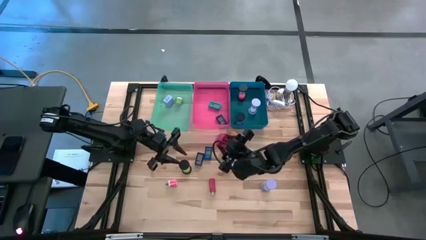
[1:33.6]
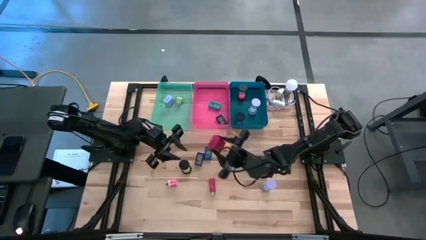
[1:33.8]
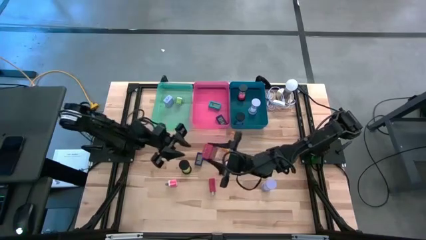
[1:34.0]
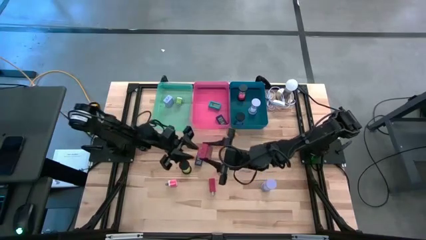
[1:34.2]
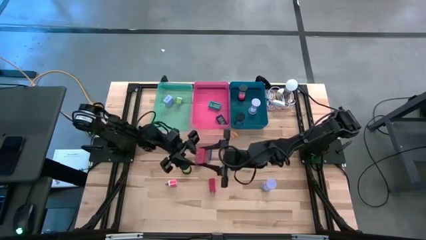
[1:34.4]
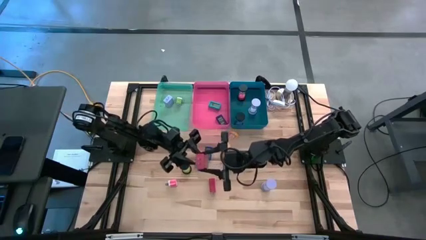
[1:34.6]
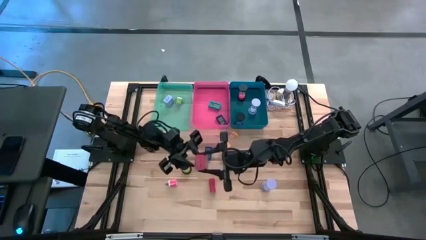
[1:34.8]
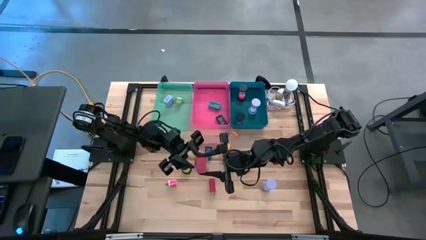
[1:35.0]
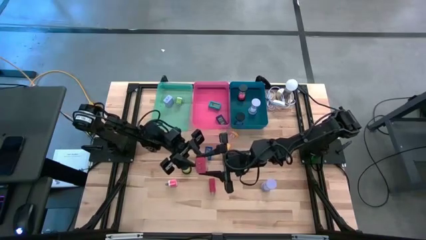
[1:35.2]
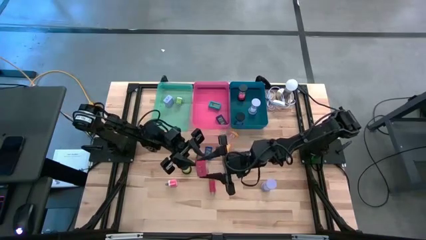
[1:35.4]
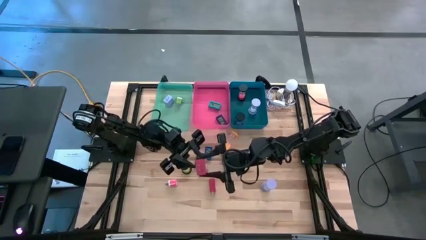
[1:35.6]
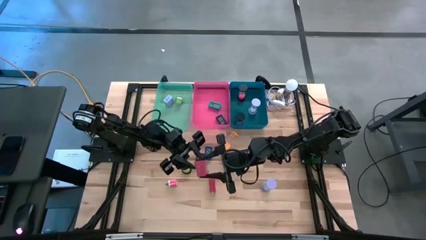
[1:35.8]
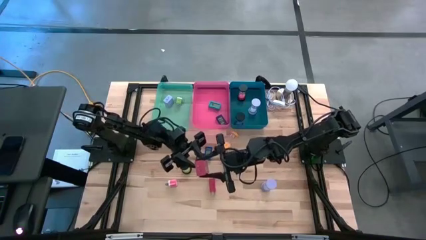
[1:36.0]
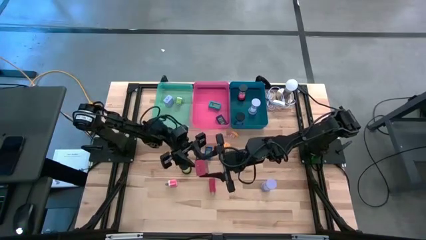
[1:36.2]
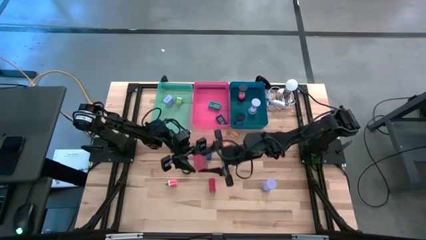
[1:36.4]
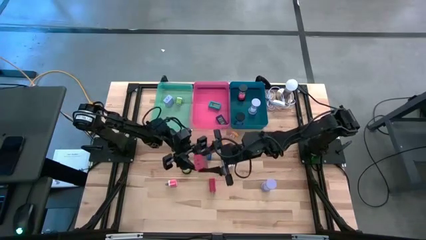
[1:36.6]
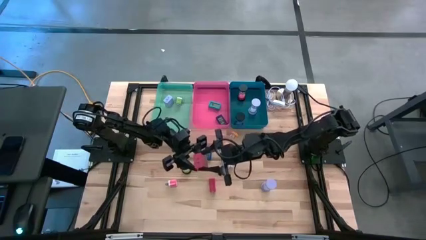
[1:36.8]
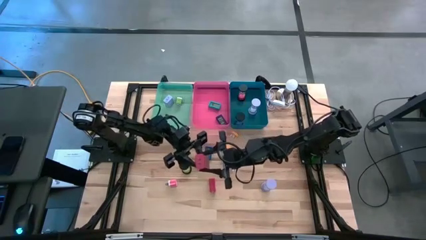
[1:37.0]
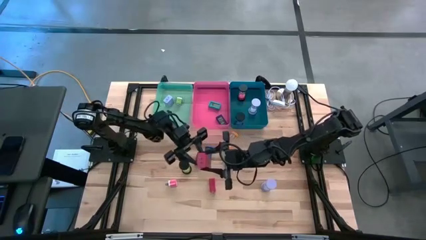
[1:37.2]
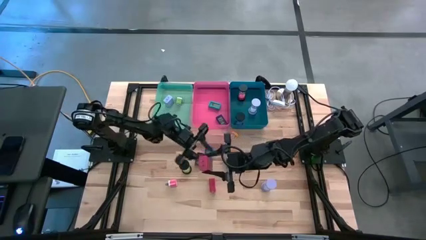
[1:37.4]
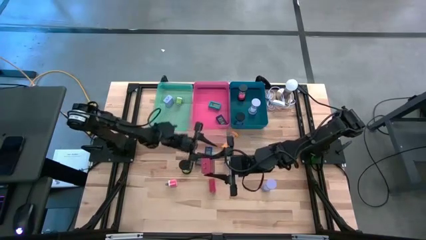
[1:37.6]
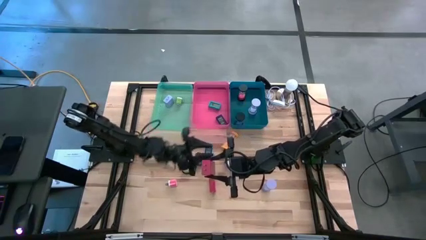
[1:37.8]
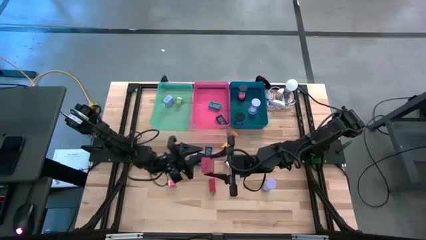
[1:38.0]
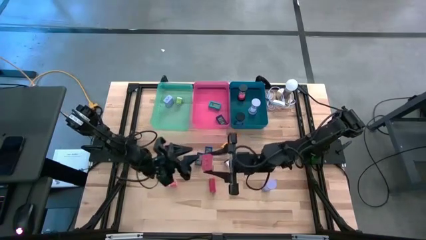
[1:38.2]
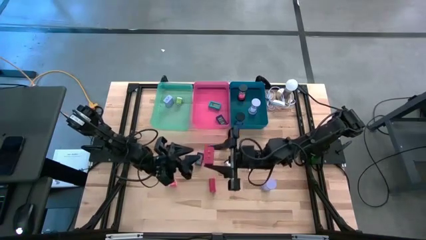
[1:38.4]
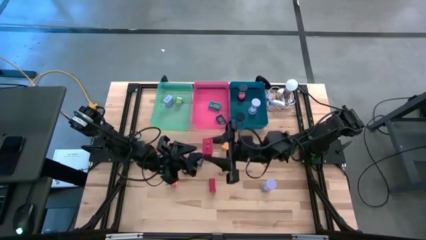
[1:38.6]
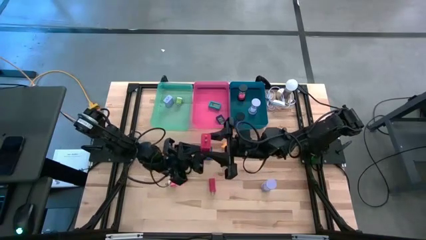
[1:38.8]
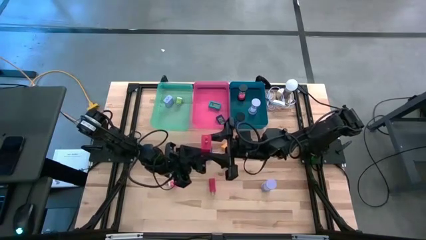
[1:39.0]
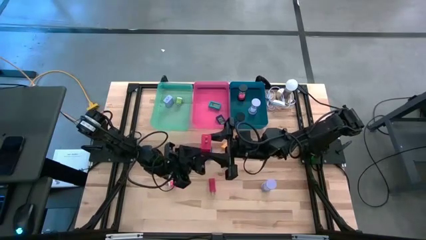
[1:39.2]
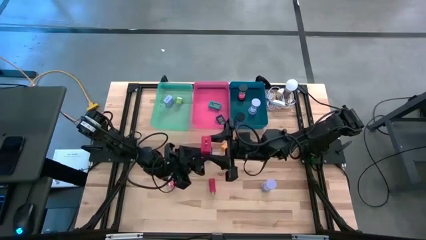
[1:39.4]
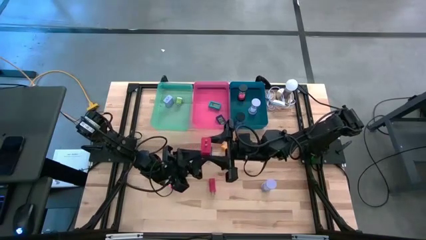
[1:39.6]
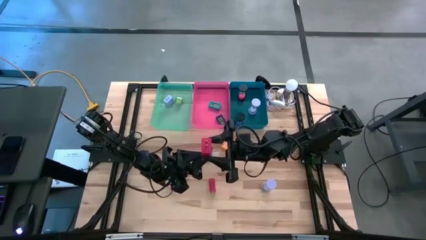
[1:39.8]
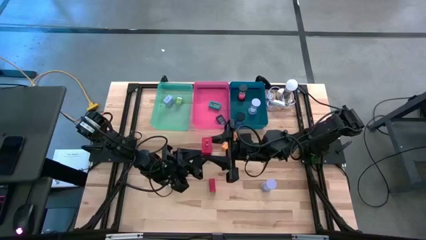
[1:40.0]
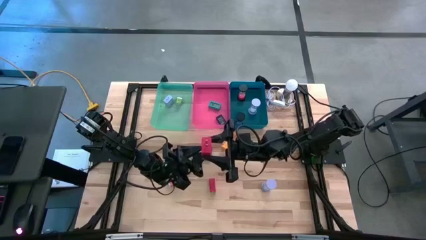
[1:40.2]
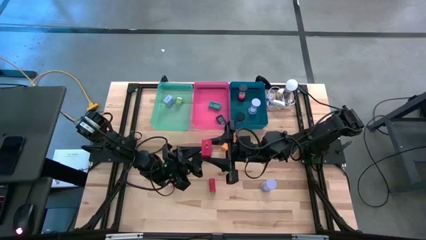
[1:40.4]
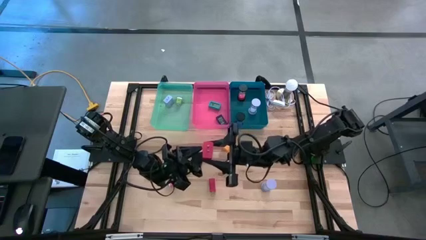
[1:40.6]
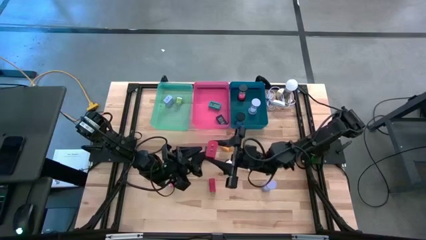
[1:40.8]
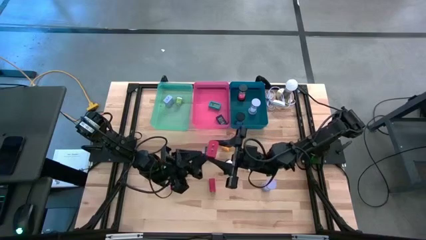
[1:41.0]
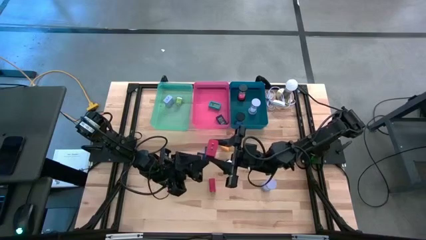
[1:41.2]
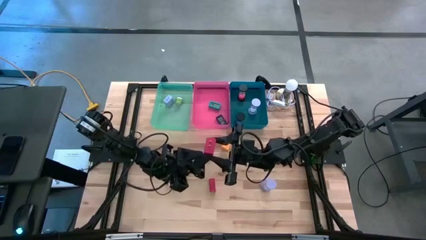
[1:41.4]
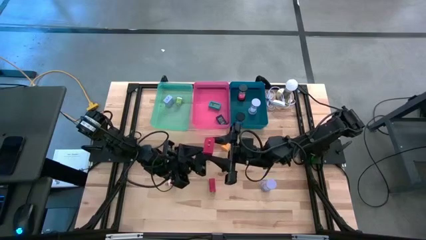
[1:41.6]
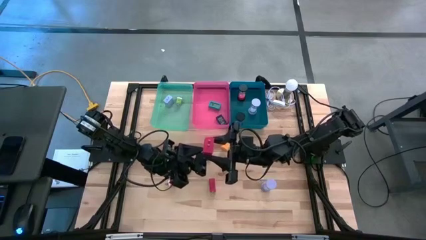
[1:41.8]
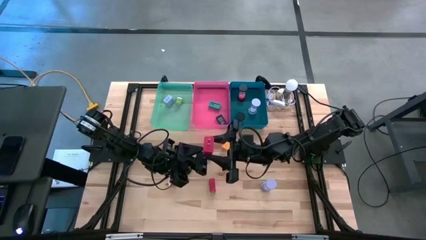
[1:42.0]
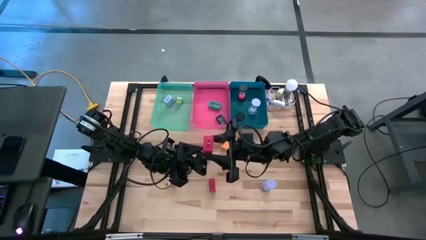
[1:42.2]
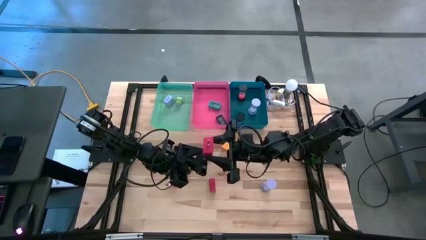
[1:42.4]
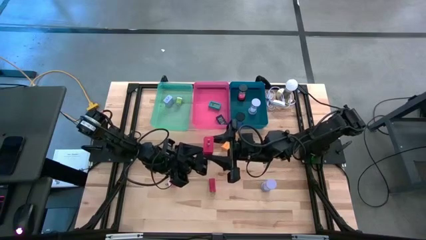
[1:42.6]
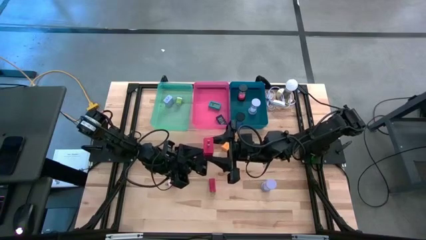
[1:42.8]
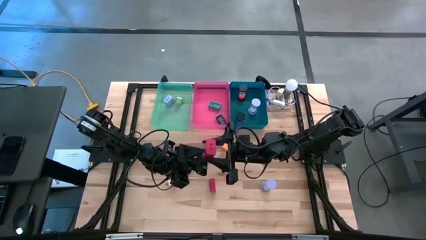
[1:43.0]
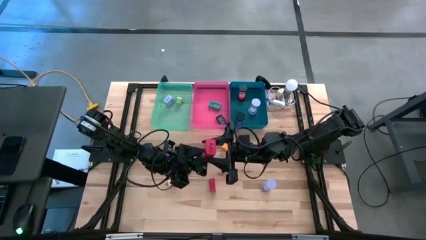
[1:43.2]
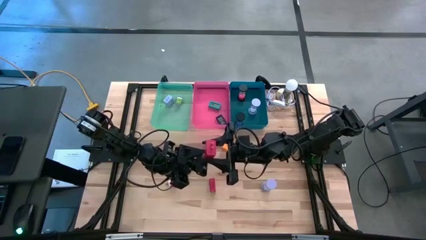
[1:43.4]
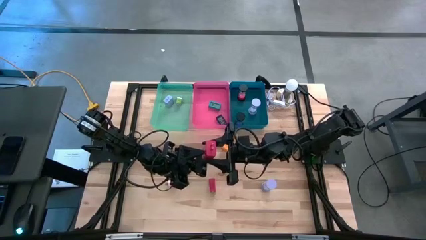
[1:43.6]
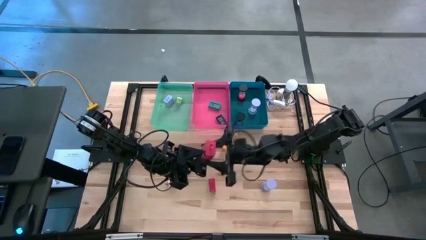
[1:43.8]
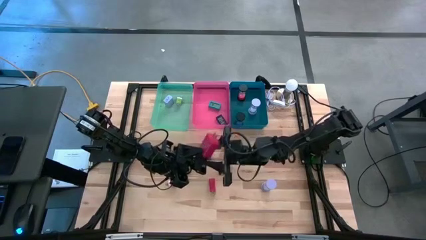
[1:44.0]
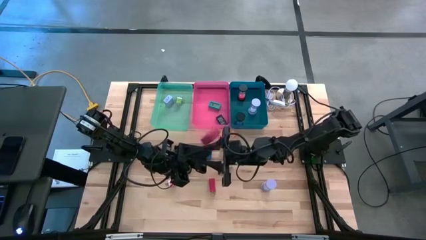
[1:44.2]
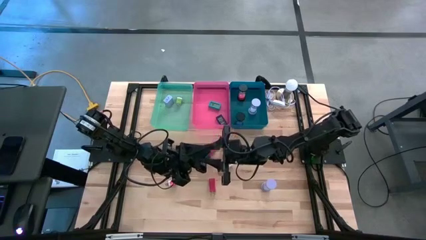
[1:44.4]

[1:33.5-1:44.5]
Task: Pick & Place Office items
Put the right red adapter into the green bin

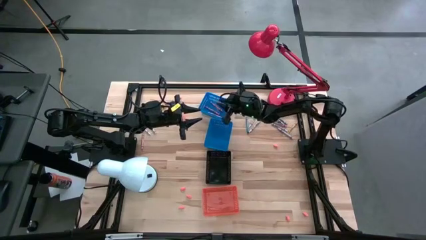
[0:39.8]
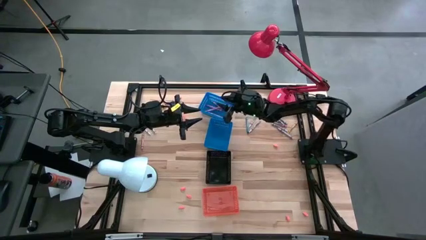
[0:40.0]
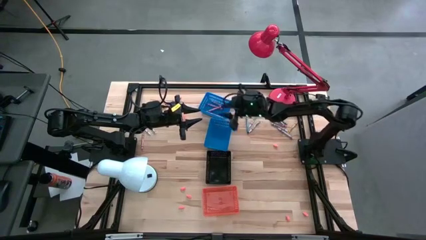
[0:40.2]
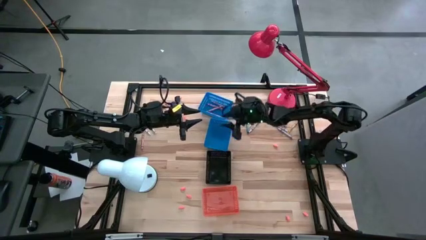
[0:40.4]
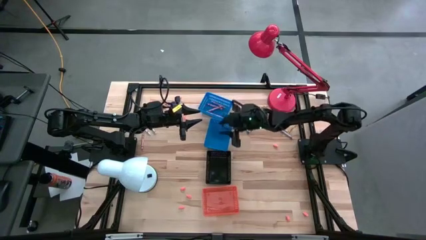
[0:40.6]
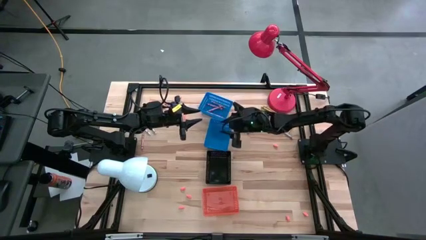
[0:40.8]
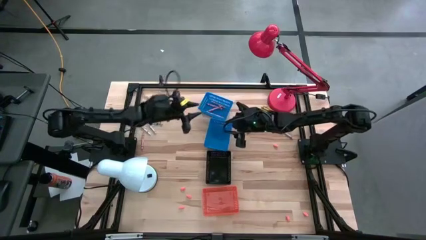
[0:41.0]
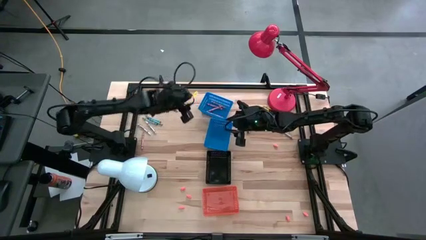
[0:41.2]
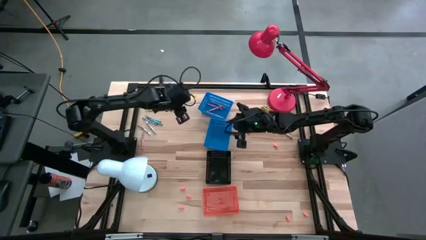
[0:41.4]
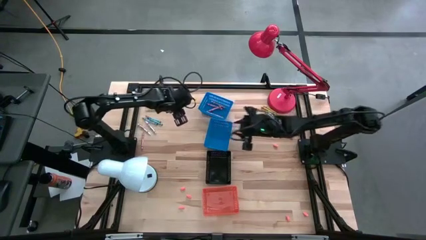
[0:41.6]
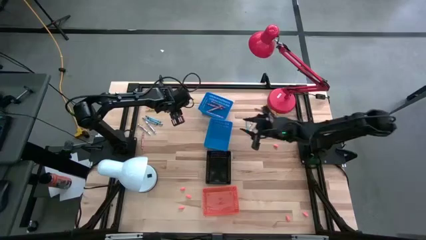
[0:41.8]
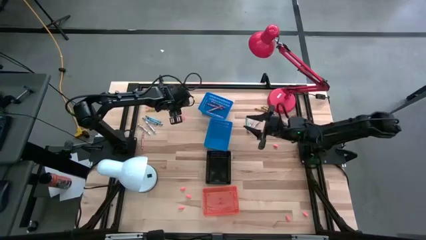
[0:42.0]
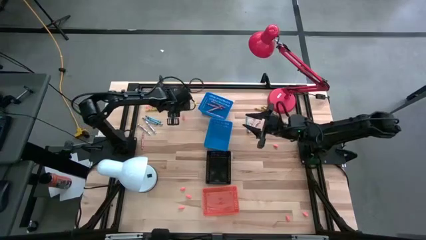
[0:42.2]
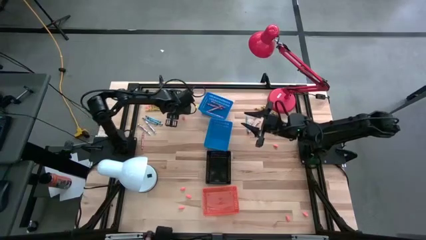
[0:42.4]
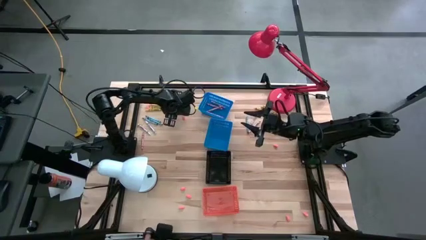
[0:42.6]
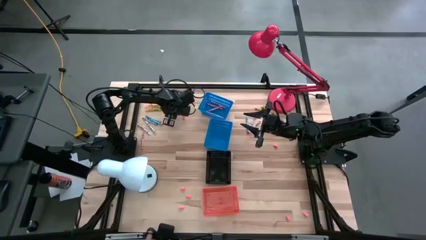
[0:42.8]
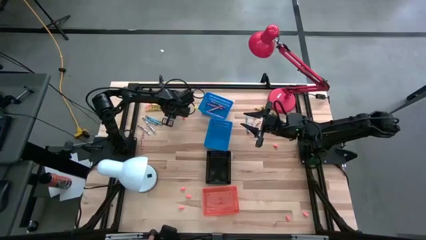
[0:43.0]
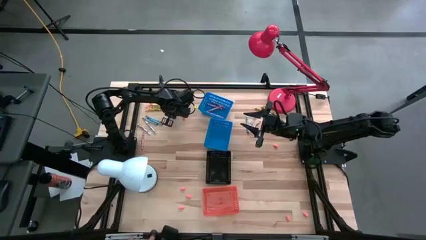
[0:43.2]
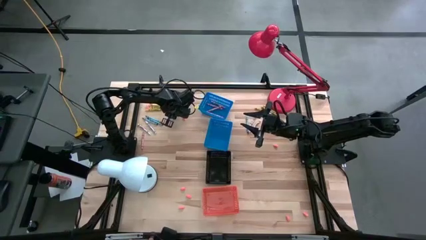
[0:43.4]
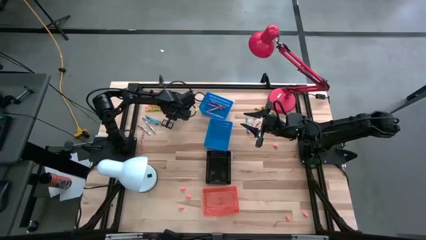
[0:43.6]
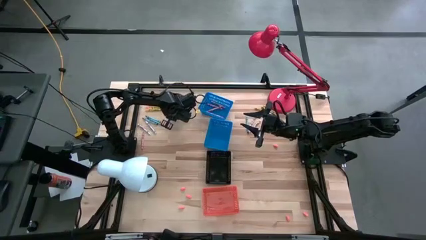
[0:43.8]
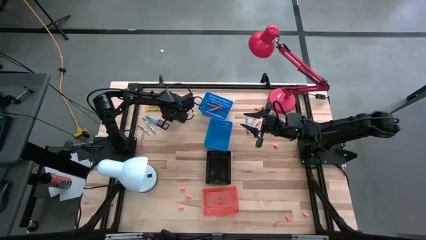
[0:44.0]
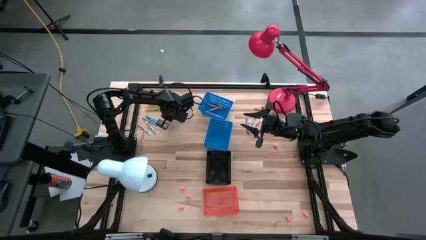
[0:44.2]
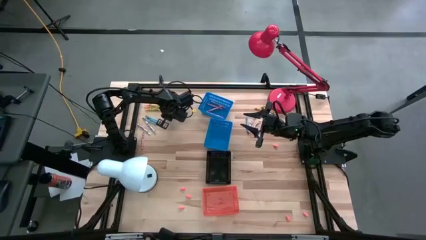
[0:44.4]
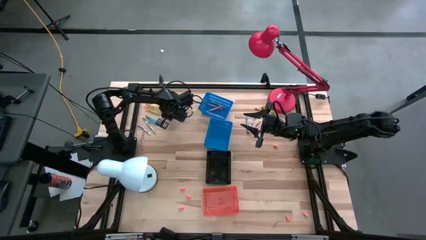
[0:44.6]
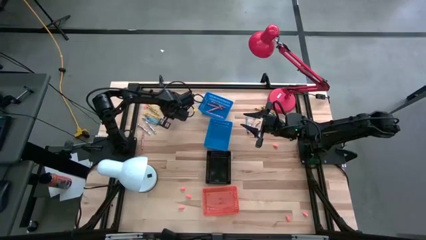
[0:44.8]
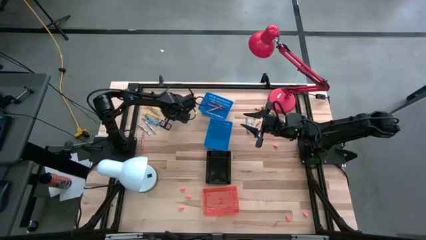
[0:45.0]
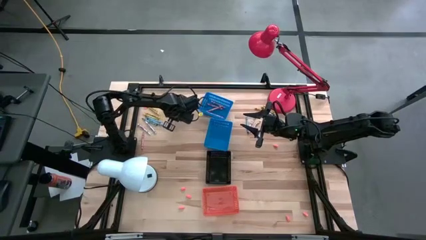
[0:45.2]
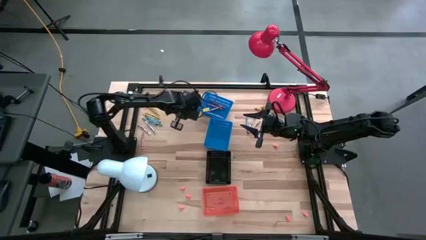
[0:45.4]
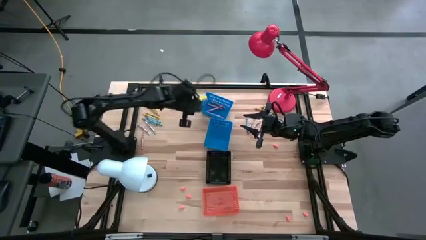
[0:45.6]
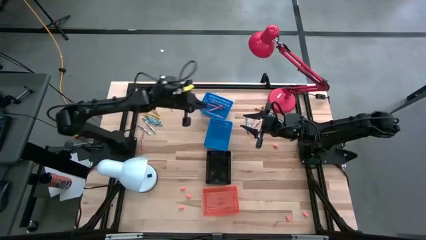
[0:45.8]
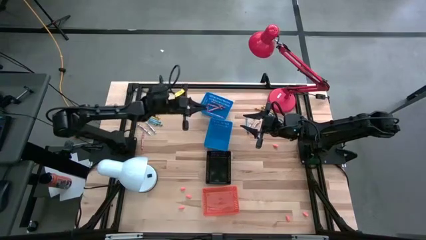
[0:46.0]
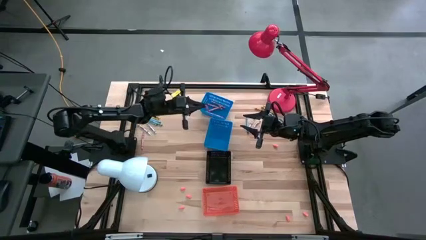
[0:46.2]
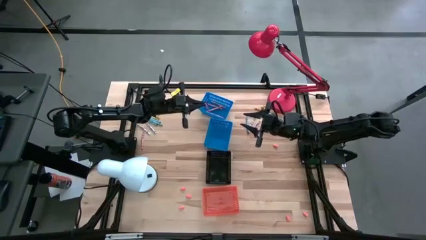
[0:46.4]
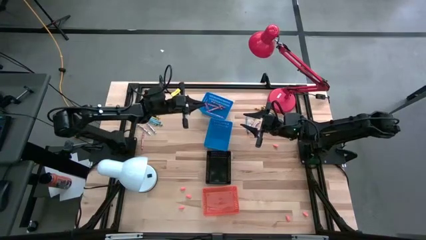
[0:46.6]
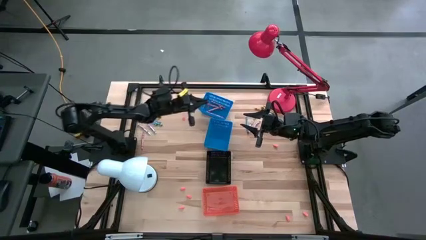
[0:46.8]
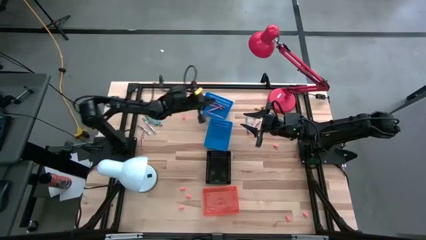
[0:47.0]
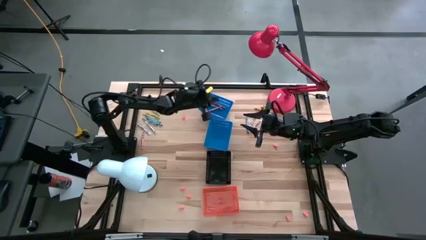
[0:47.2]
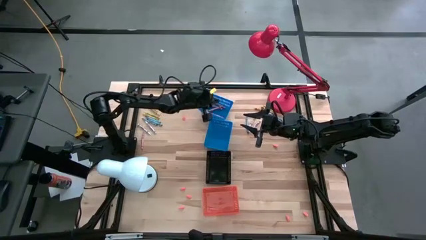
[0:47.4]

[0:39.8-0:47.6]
Task: Sort crayons
Put the pink crayon into the top blue bin
